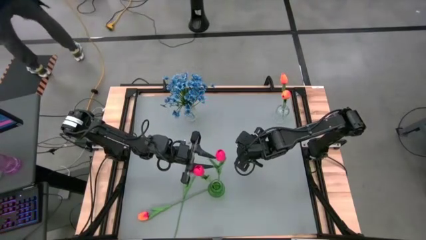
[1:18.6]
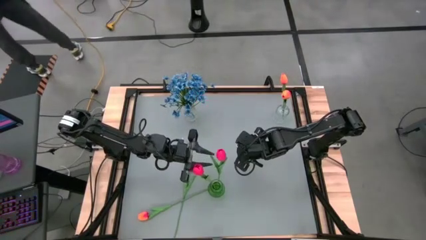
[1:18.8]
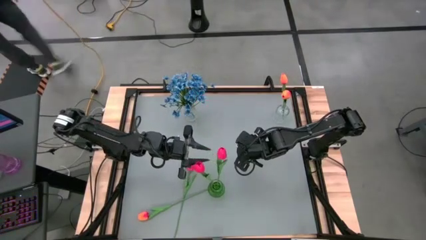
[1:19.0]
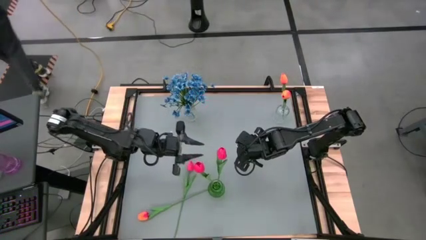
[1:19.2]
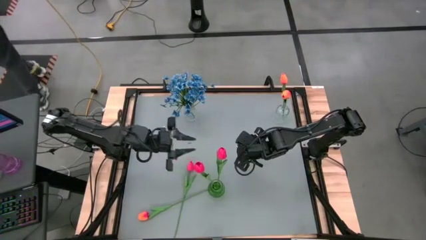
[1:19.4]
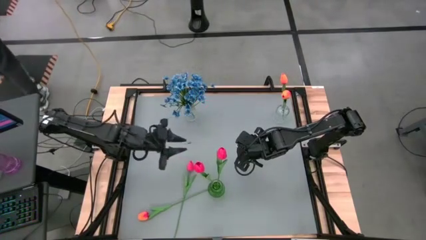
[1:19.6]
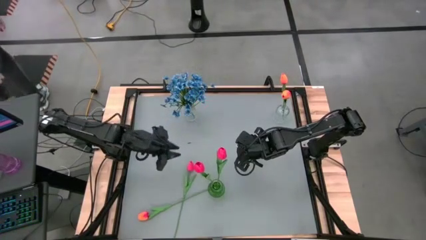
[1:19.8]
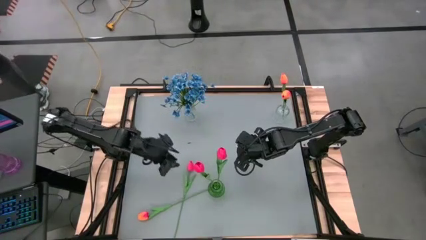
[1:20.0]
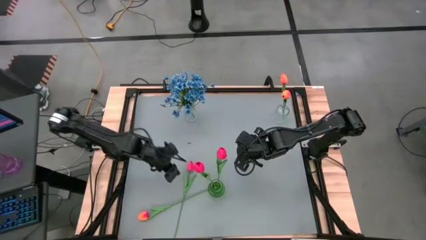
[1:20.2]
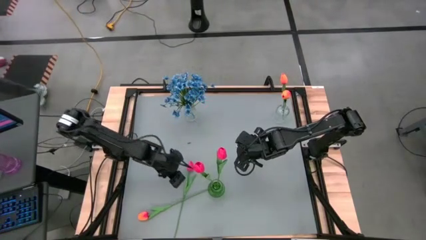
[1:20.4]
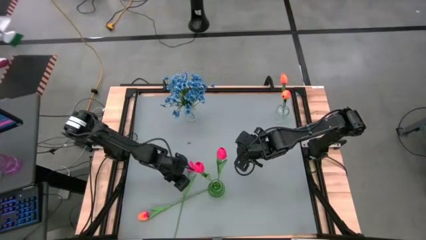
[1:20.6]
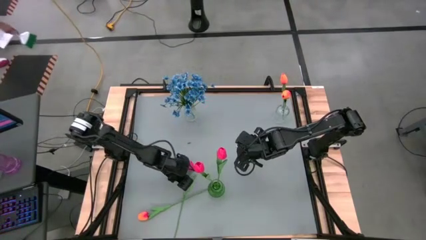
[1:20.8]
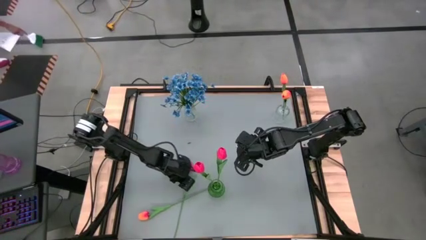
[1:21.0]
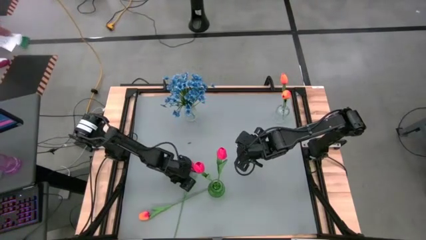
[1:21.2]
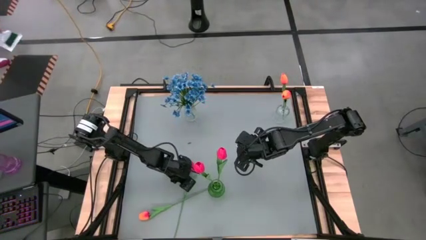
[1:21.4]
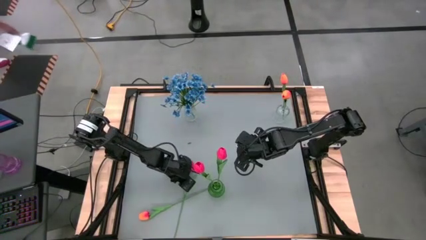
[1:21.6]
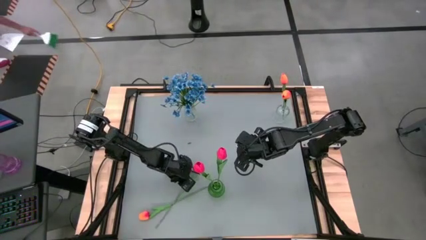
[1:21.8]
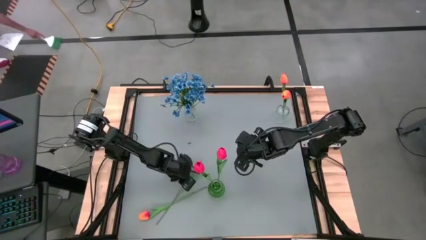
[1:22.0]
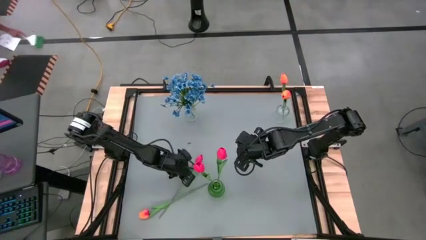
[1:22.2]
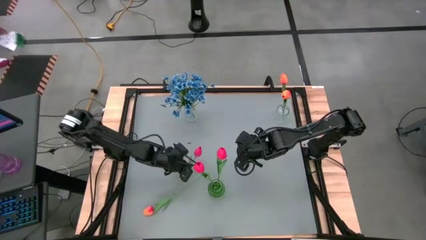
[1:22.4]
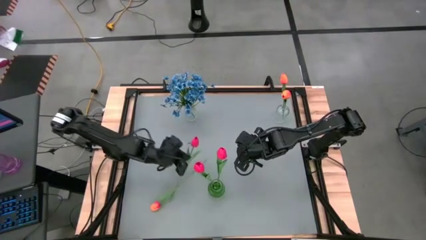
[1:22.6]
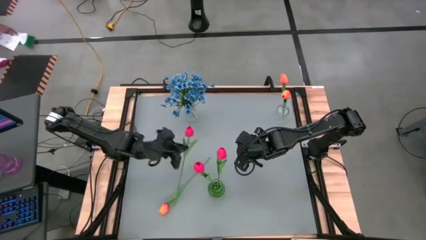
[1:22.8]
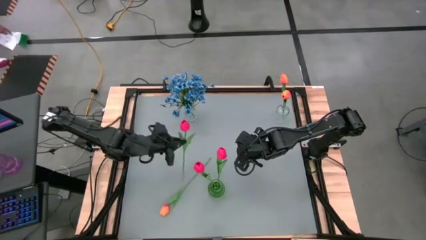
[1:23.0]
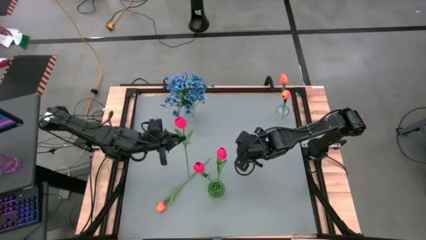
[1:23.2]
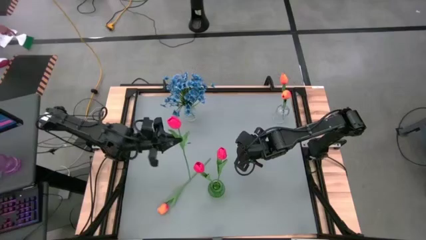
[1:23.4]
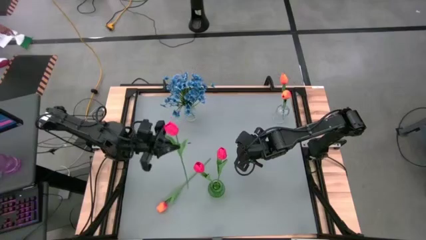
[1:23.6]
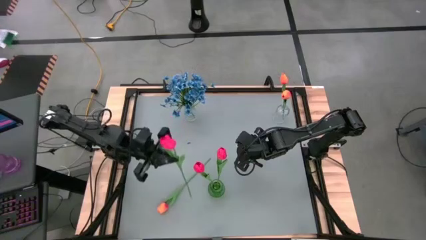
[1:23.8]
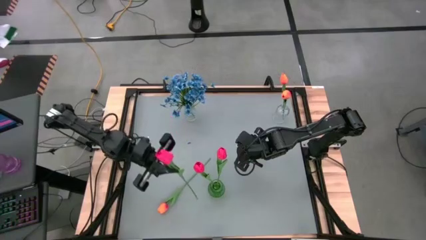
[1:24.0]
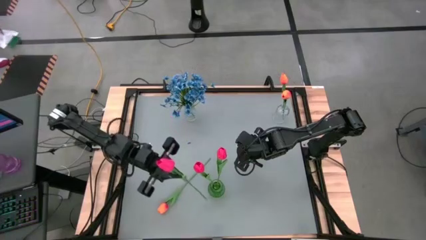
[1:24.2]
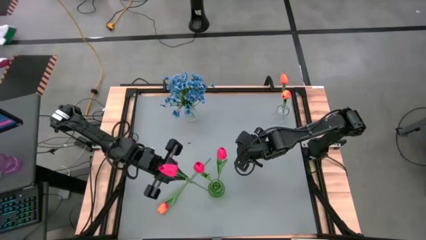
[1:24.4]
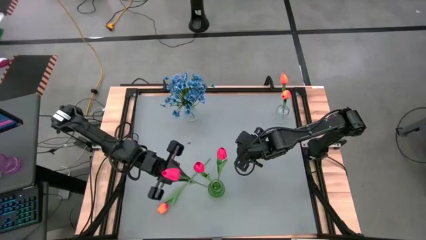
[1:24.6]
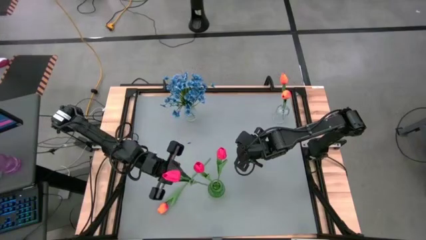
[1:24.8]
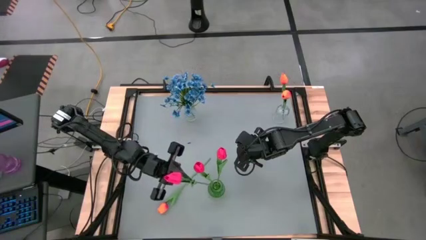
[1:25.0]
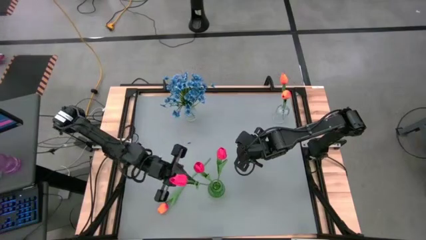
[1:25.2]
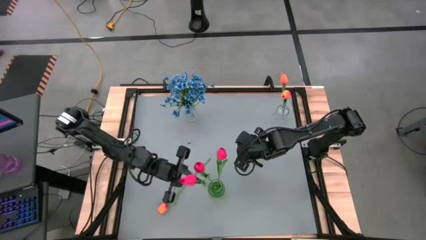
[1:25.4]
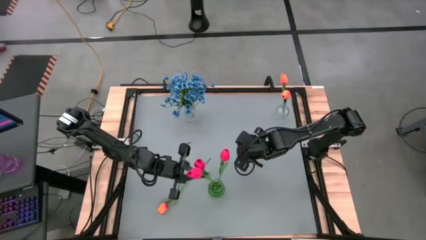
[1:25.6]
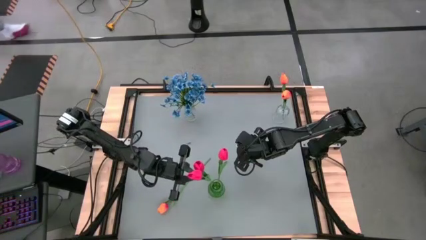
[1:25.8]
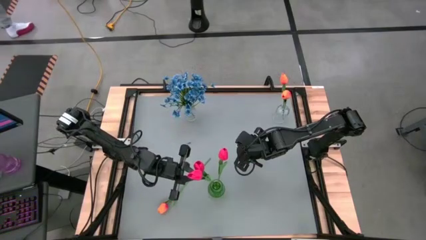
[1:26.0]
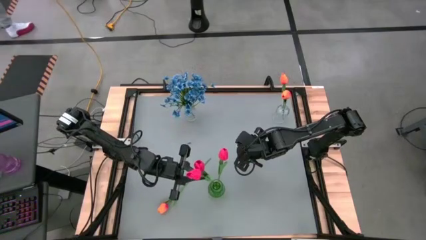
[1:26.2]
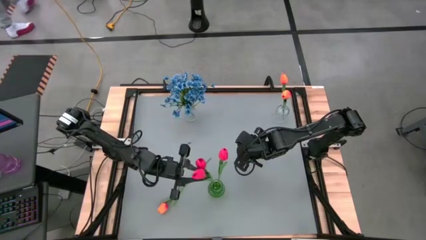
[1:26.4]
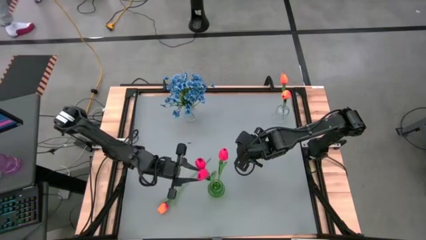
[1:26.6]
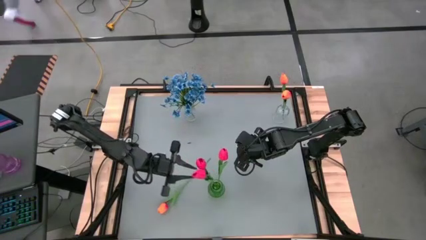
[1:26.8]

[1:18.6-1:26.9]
Task: Sort flowers into vase by color
Put the pink tulip into the green vase

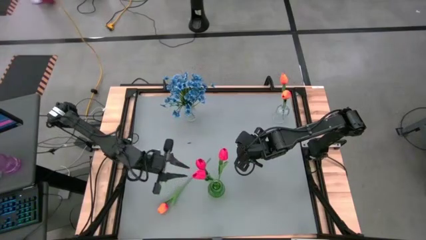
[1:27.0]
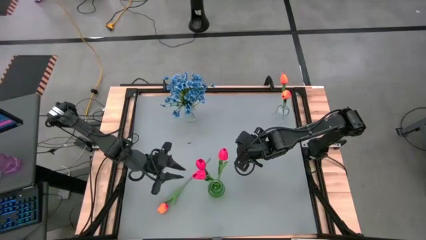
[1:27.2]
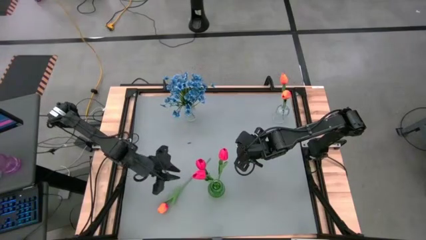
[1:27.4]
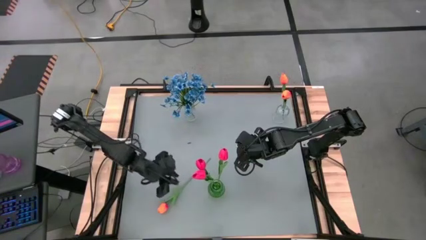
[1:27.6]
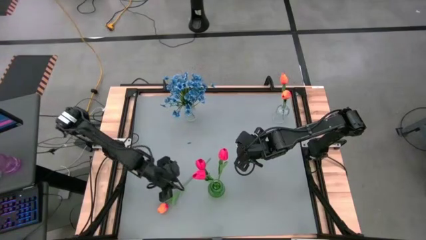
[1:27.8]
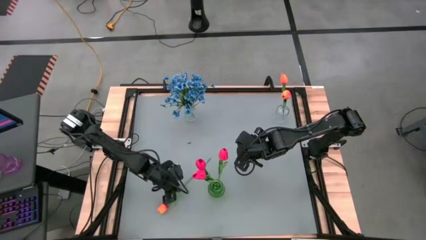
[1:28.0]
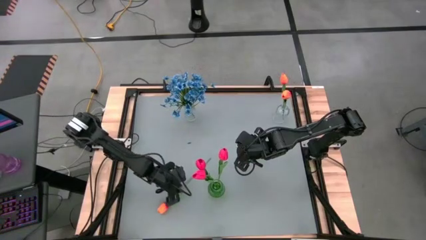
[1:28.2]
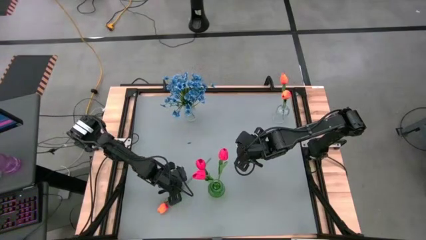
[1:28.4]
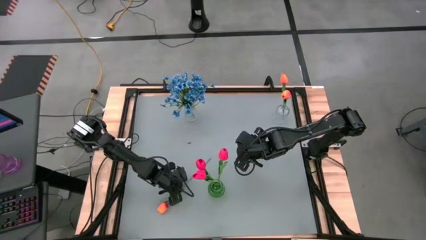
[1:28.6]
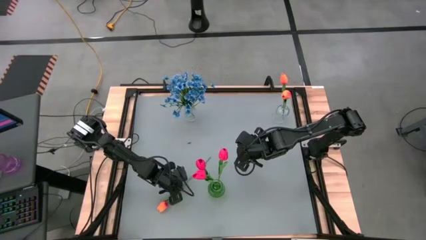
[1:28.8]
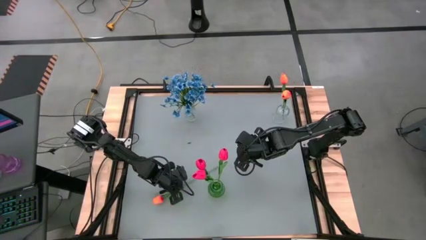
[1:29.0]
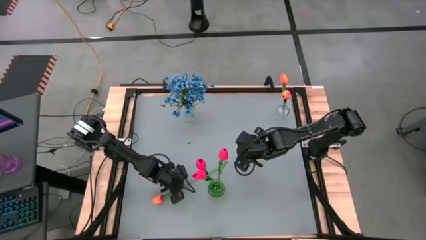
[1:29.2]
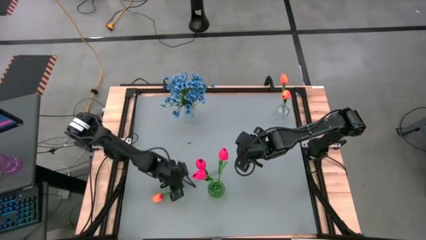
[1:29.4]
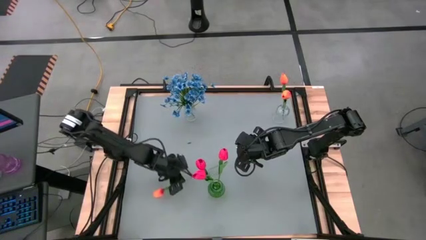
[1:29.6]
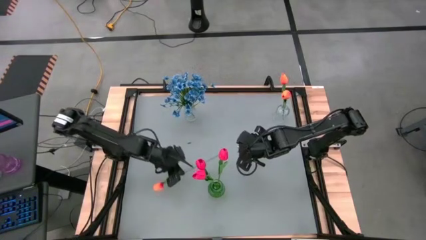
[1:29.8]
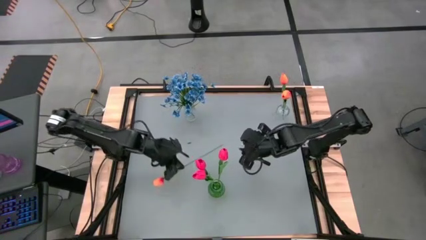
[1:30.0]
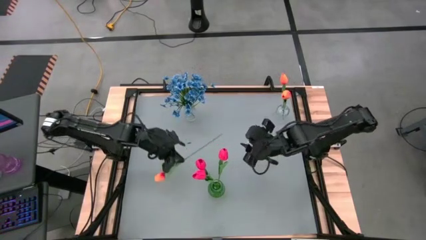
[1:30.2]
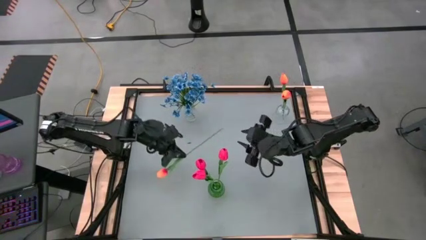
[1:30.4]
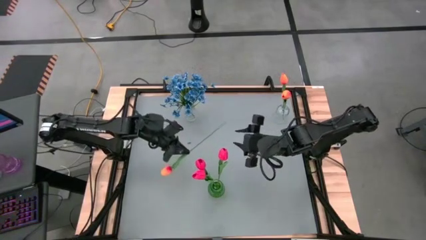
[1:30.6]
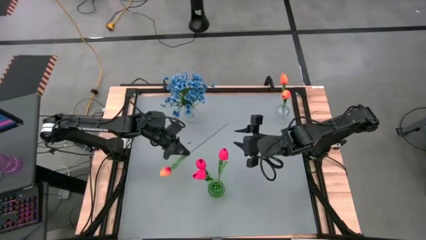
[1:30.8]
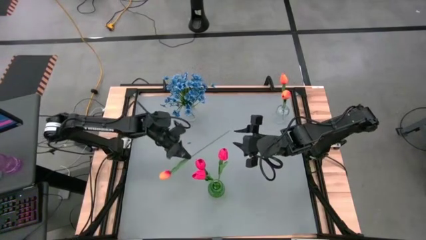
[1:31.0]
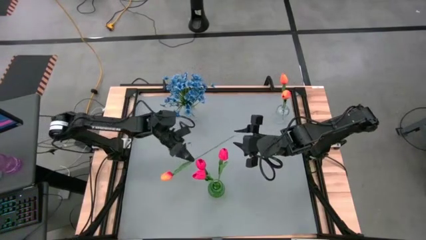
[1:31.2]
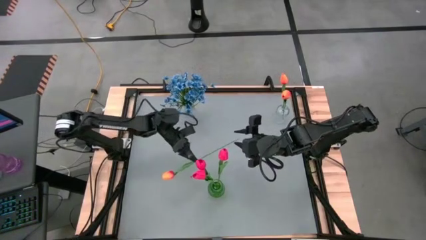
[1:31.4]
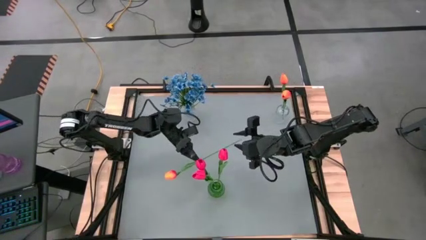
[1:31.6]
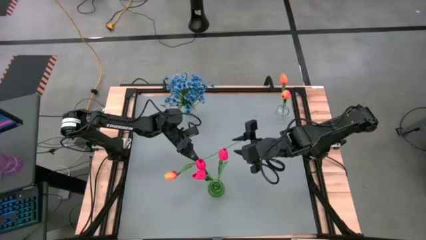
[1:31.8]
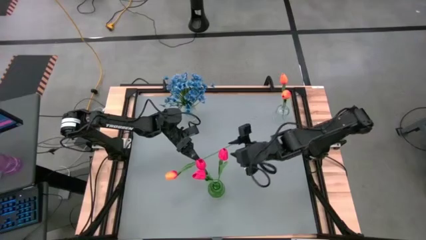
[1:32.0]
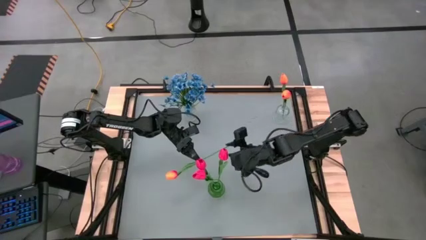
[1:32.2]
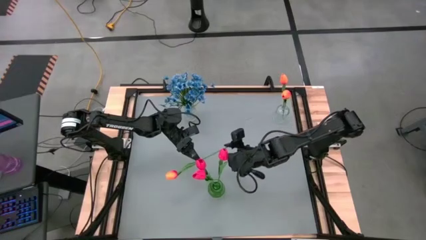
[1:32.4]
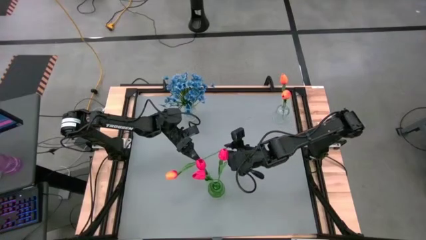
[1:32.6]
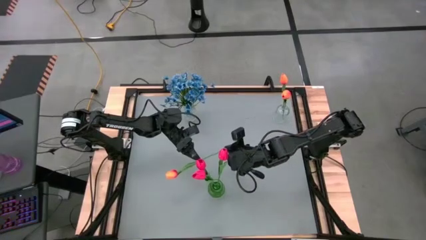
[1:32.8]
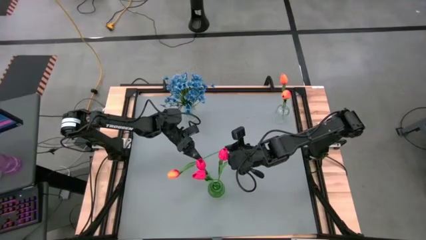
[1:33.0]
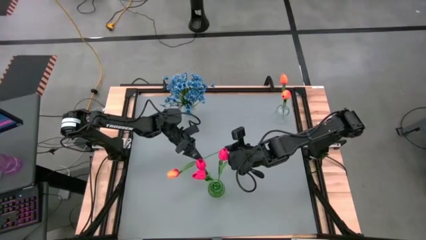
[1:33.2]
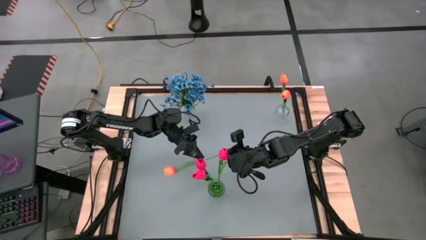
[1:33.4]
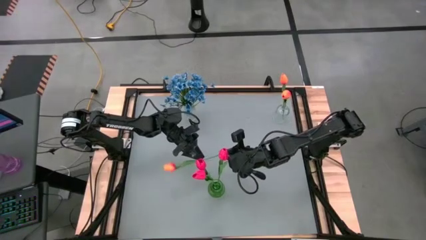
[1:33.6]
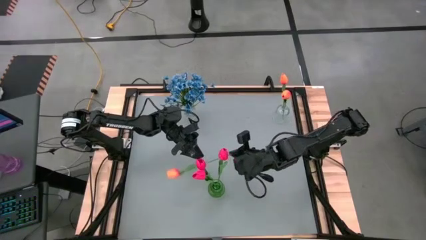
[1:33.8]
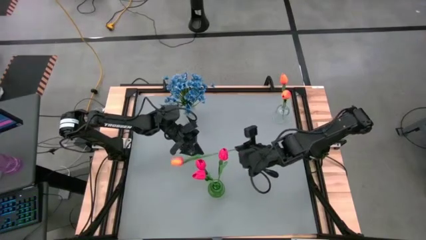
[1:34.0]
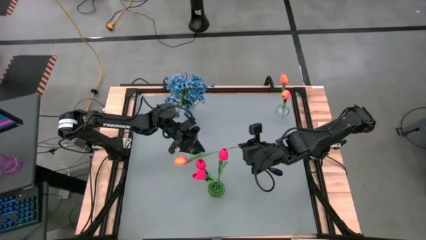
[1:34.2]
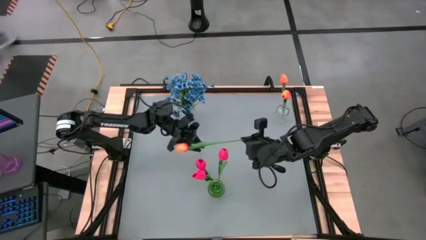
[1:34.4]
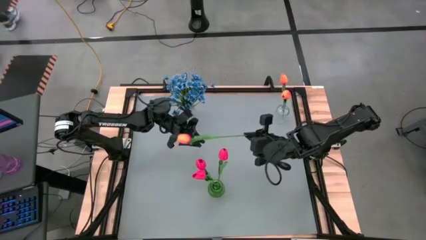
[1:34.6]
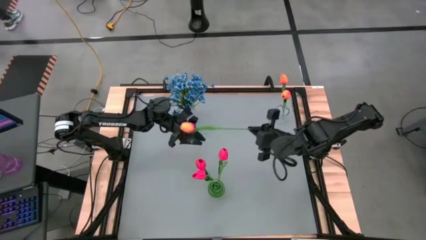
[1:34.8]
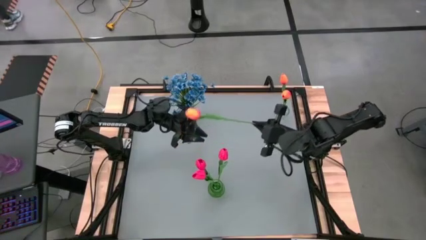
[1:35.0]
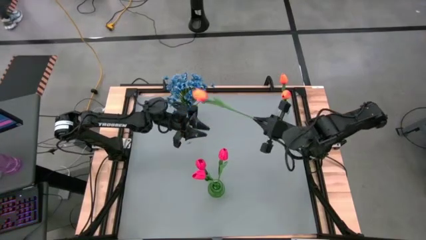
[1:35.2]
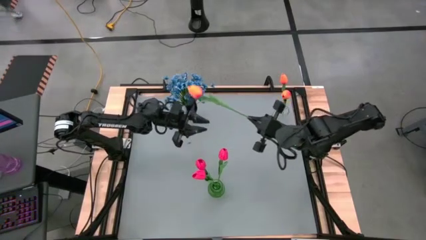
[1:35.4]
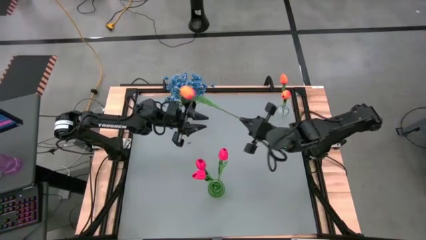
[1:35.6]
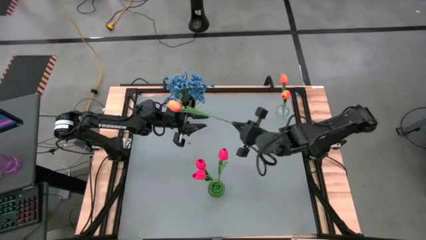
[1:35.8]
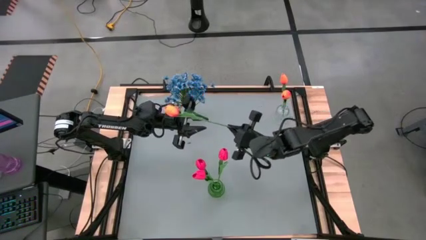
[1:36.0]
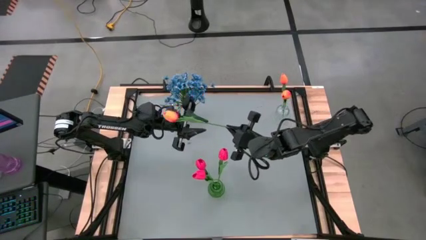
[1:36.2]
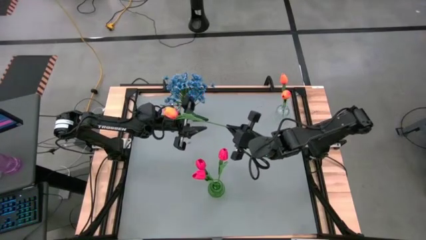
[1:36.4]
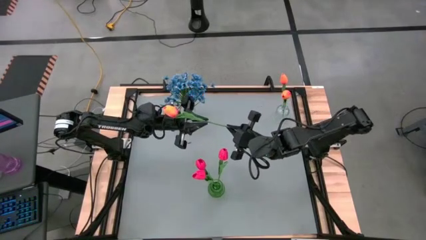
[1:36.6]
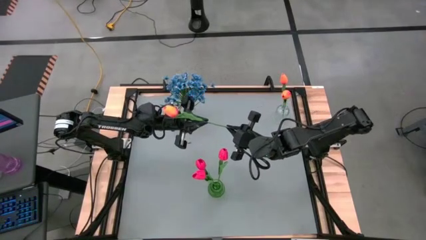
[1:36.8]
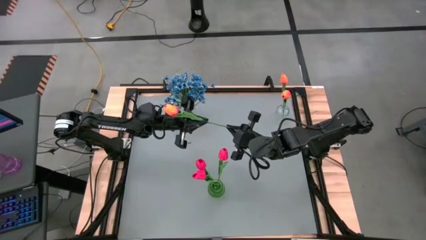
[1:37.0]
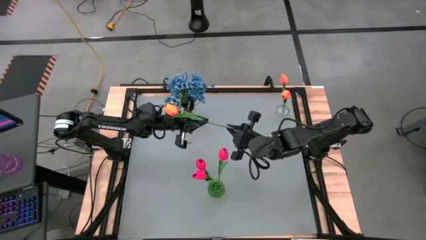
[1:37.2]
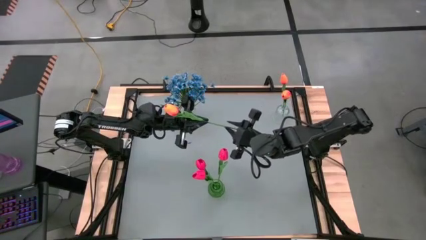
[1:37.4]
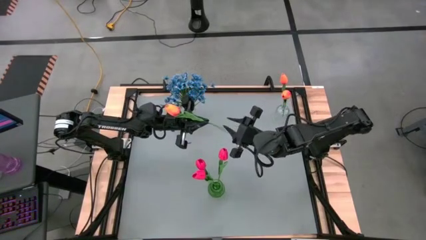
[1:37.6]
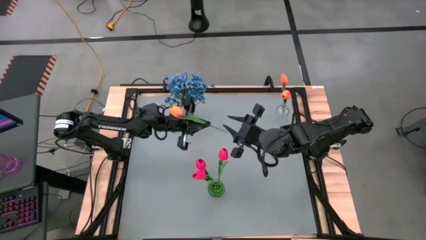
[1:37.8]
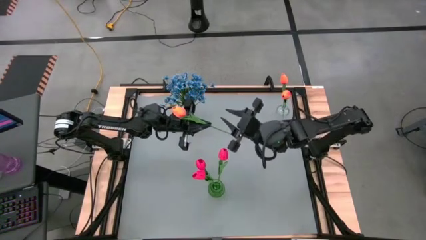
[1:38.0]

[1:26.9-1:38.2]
Put the orange tulip into the top right transparent vase
